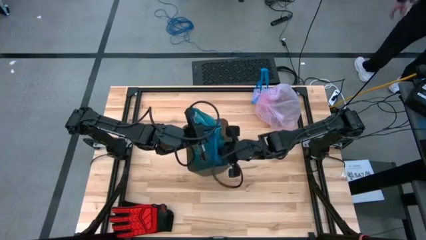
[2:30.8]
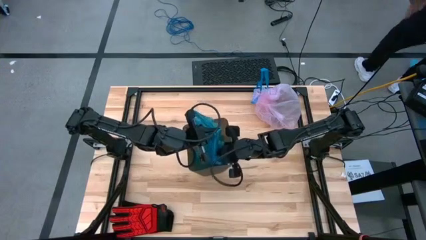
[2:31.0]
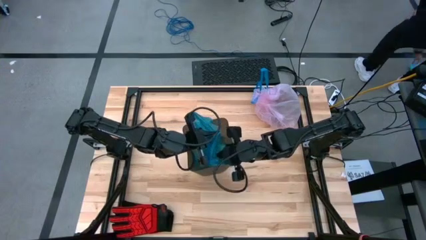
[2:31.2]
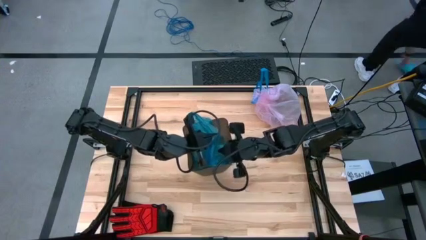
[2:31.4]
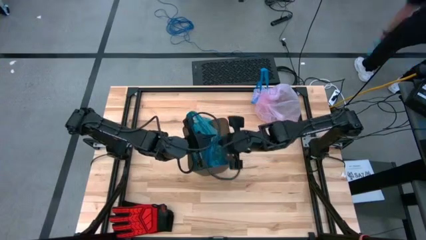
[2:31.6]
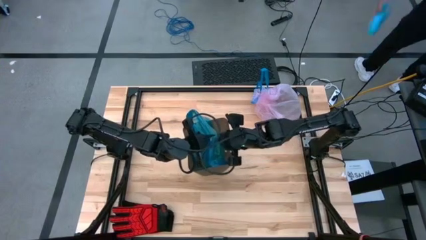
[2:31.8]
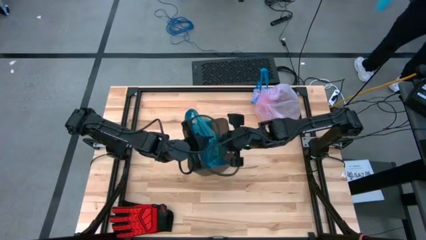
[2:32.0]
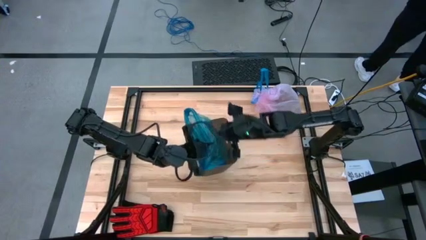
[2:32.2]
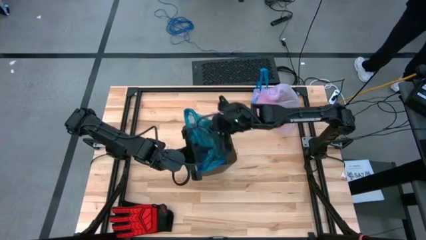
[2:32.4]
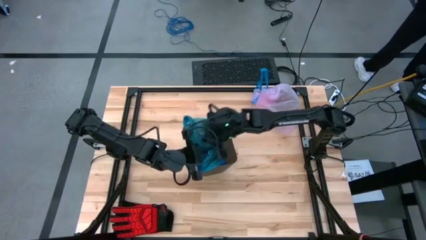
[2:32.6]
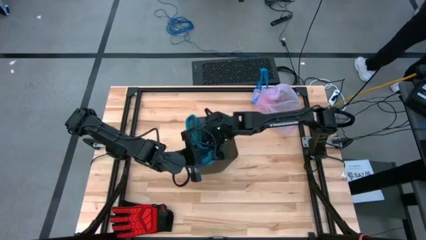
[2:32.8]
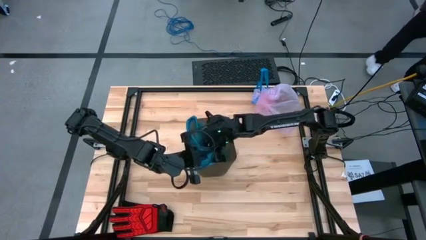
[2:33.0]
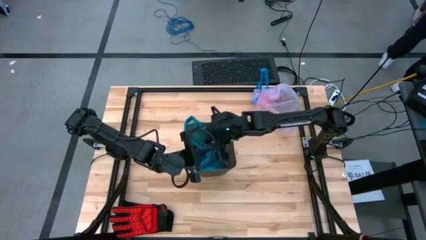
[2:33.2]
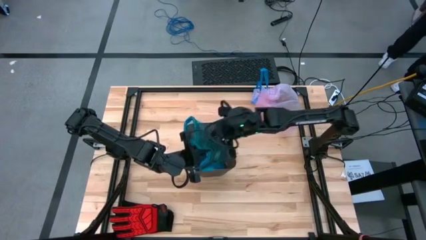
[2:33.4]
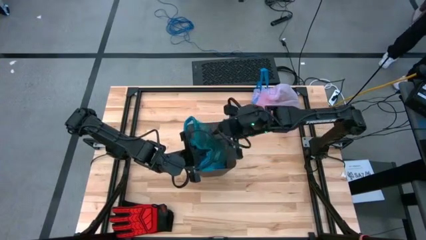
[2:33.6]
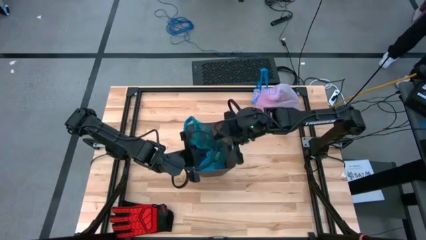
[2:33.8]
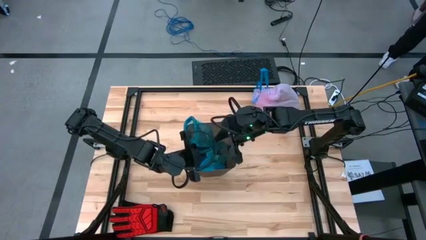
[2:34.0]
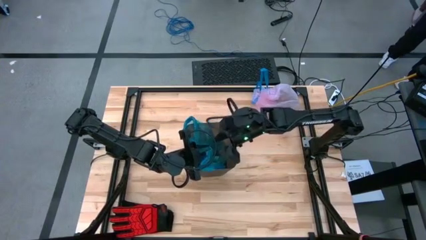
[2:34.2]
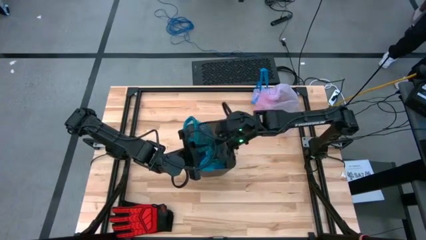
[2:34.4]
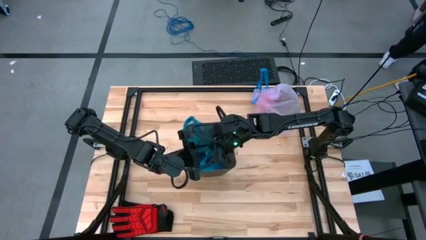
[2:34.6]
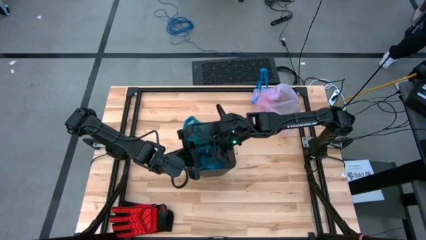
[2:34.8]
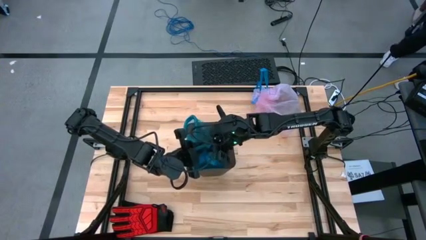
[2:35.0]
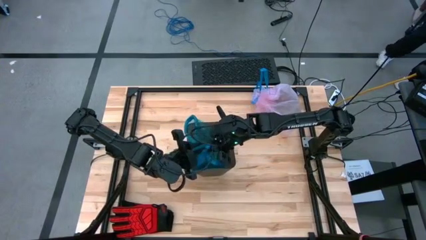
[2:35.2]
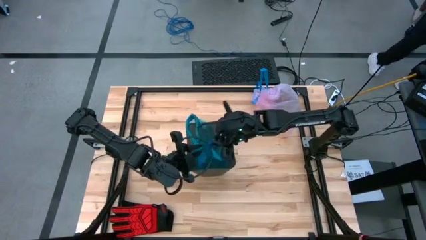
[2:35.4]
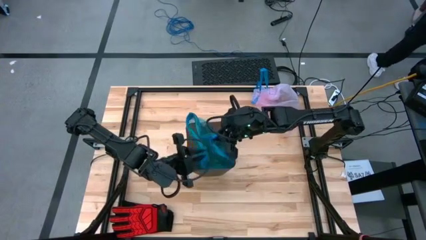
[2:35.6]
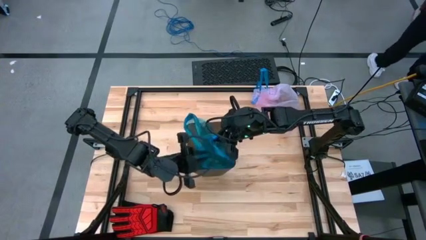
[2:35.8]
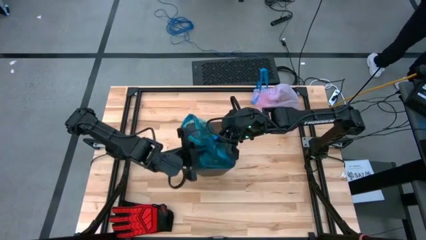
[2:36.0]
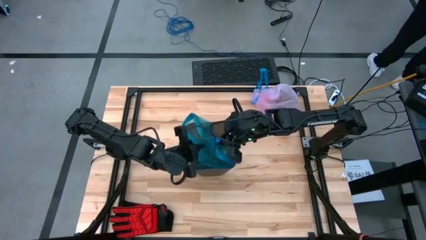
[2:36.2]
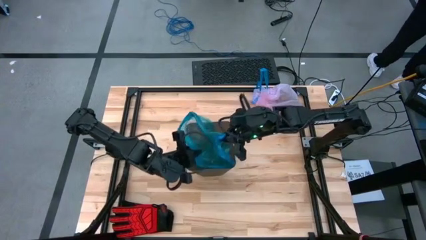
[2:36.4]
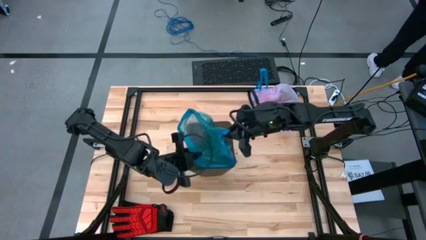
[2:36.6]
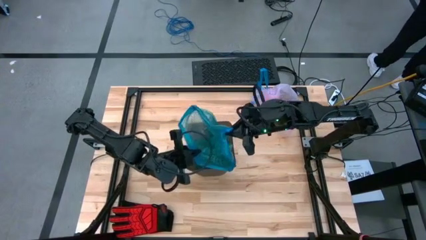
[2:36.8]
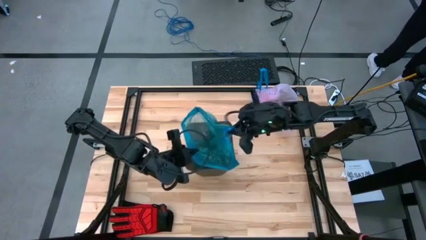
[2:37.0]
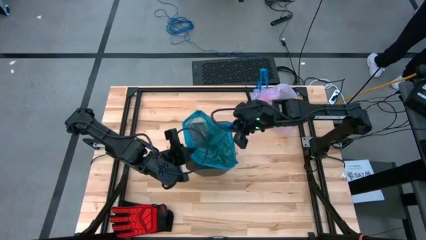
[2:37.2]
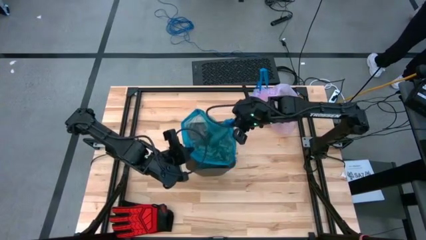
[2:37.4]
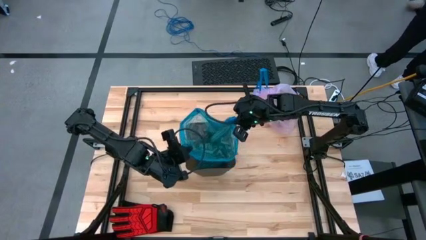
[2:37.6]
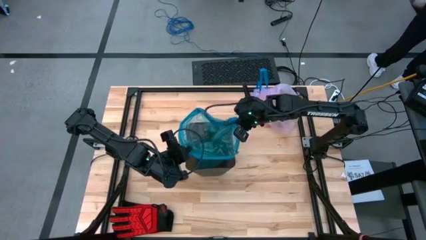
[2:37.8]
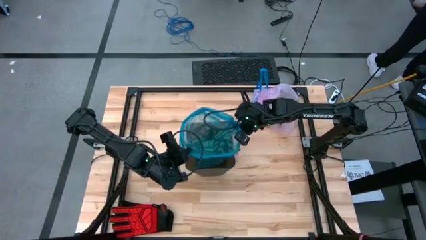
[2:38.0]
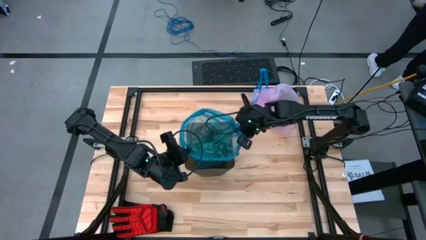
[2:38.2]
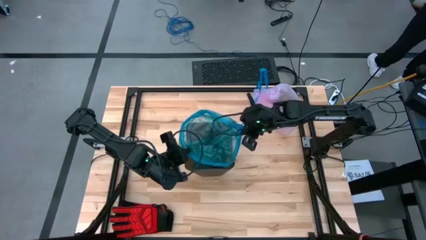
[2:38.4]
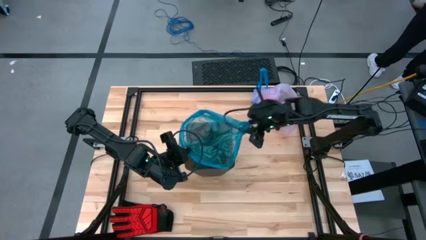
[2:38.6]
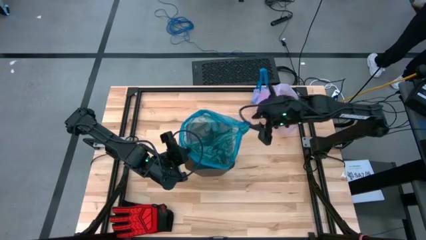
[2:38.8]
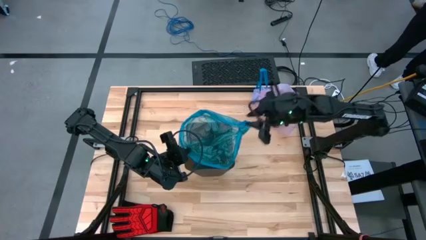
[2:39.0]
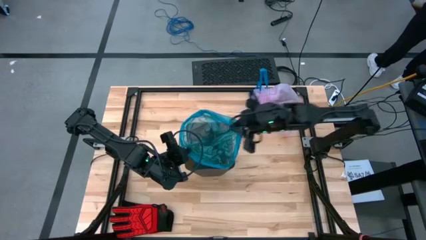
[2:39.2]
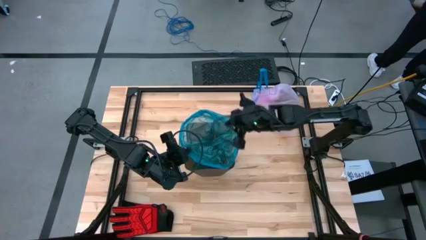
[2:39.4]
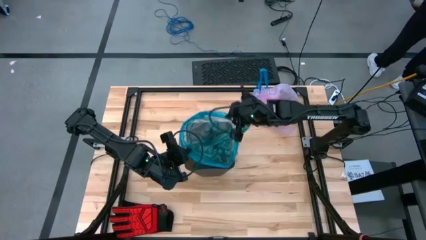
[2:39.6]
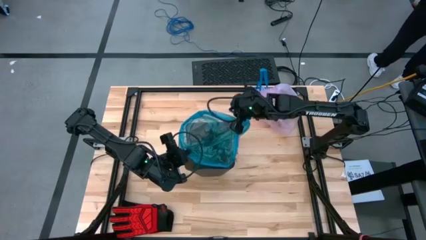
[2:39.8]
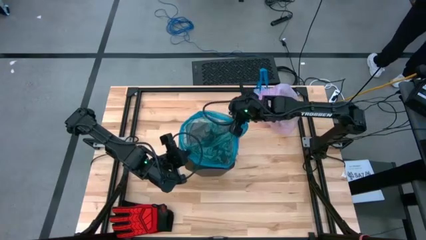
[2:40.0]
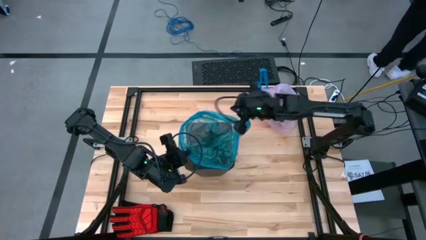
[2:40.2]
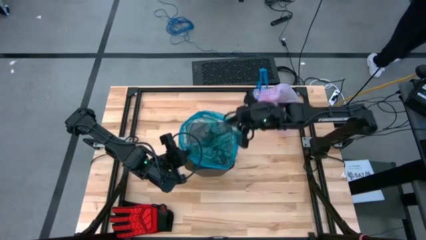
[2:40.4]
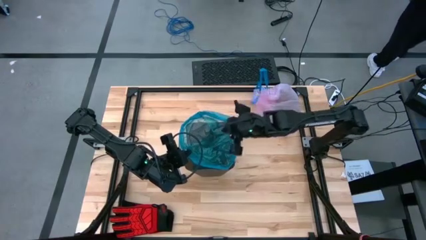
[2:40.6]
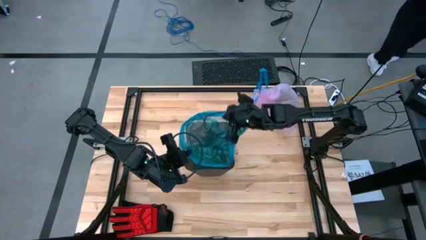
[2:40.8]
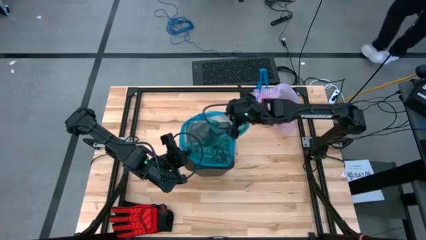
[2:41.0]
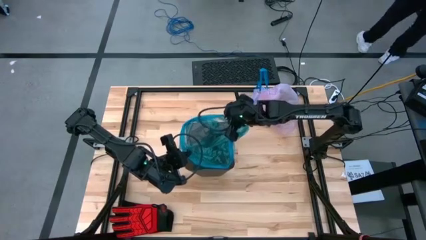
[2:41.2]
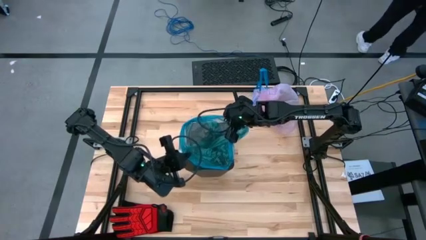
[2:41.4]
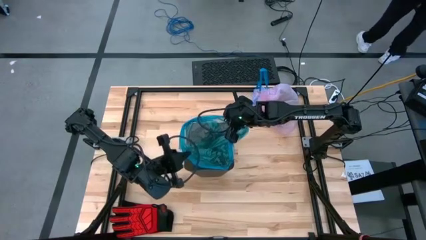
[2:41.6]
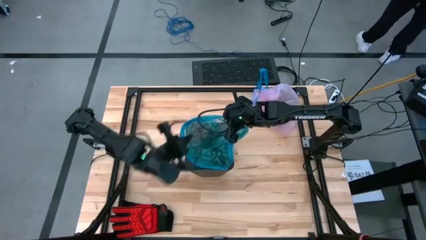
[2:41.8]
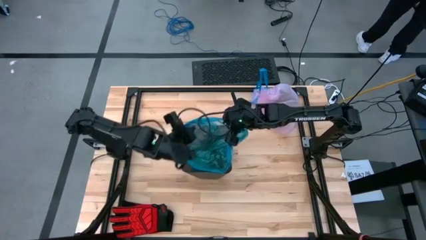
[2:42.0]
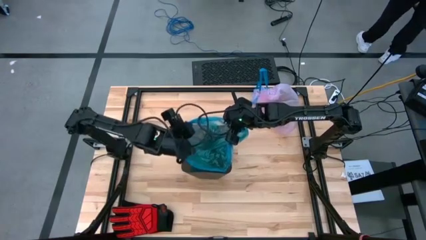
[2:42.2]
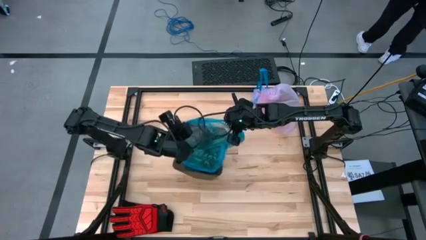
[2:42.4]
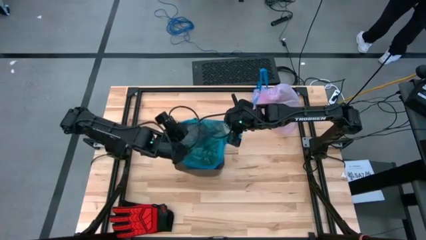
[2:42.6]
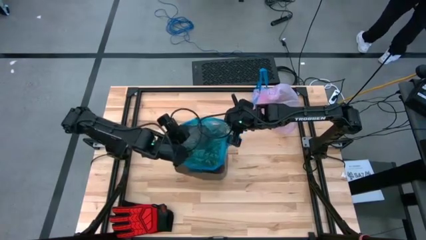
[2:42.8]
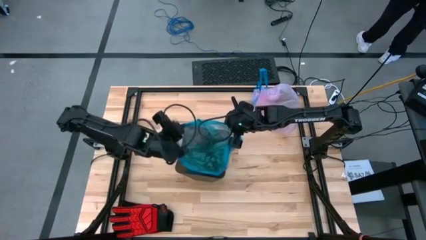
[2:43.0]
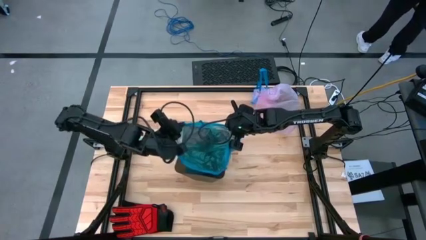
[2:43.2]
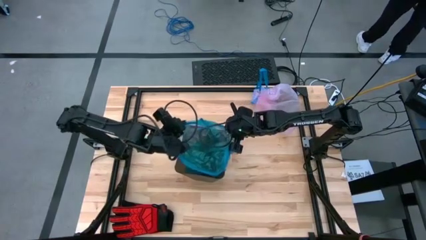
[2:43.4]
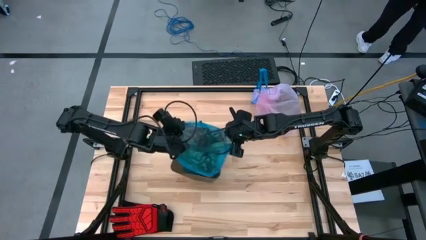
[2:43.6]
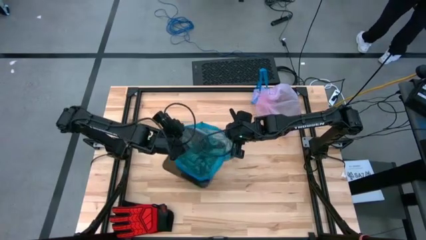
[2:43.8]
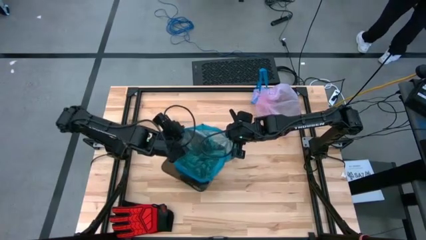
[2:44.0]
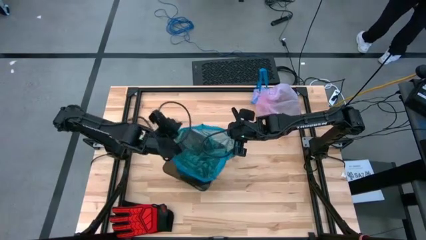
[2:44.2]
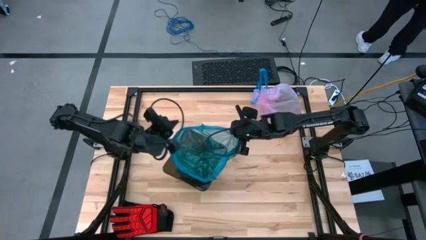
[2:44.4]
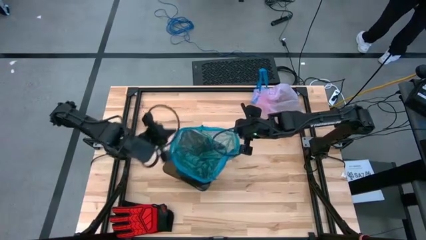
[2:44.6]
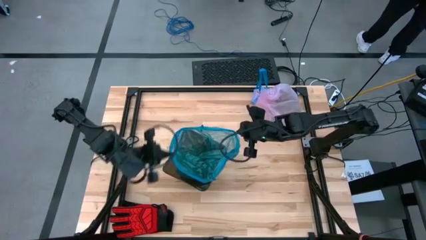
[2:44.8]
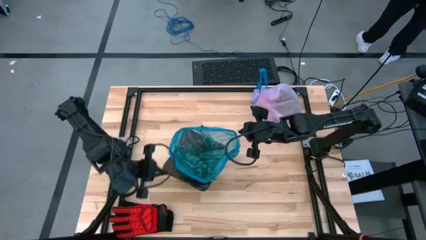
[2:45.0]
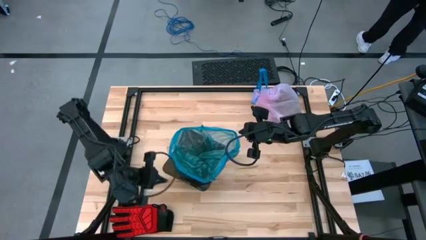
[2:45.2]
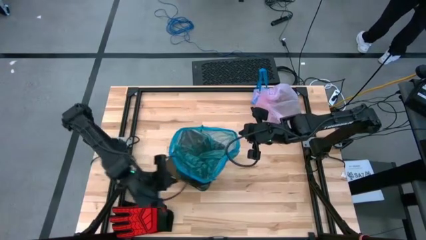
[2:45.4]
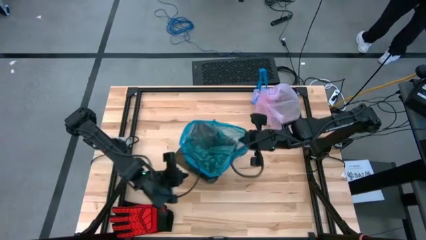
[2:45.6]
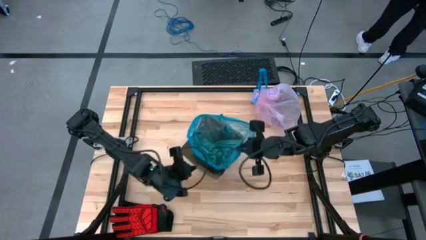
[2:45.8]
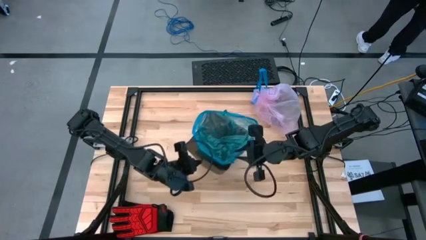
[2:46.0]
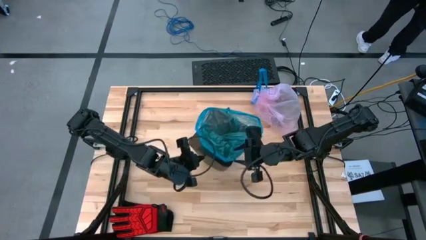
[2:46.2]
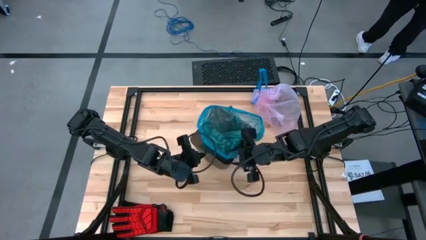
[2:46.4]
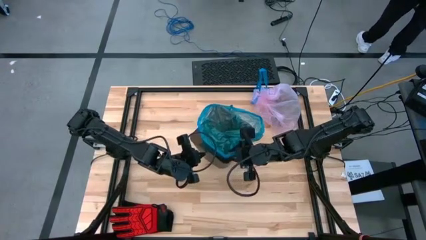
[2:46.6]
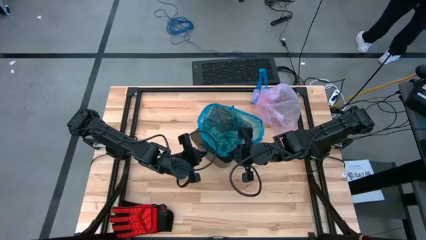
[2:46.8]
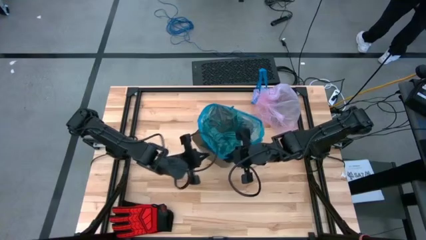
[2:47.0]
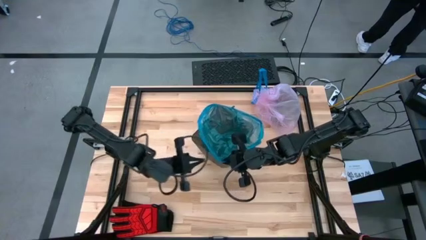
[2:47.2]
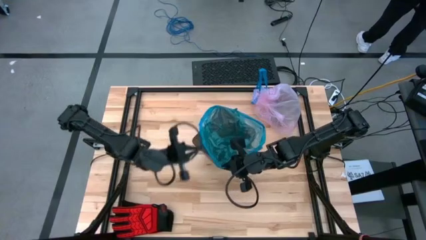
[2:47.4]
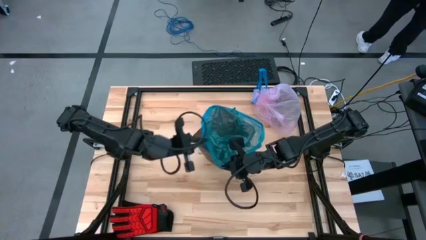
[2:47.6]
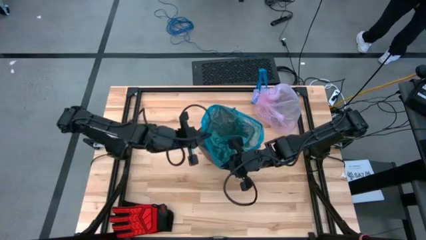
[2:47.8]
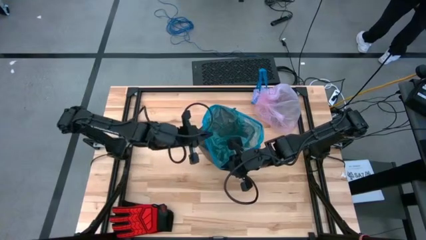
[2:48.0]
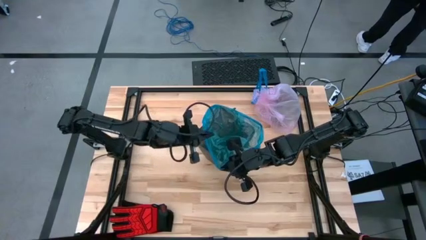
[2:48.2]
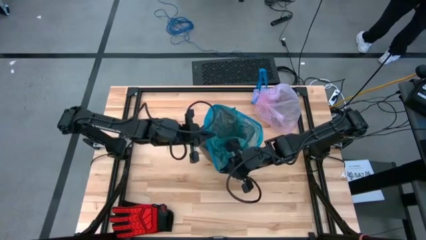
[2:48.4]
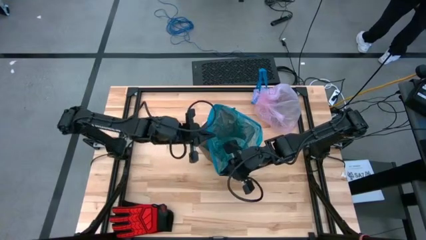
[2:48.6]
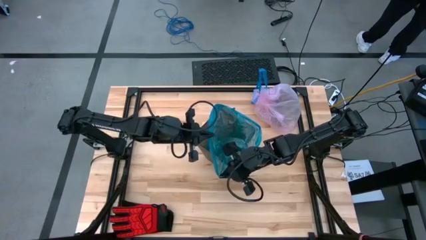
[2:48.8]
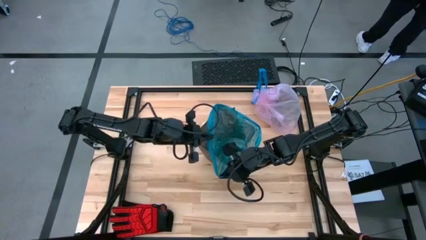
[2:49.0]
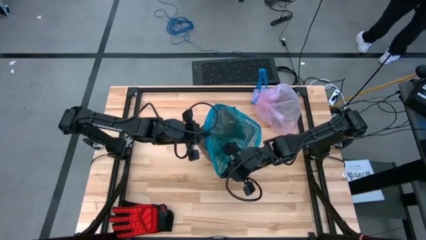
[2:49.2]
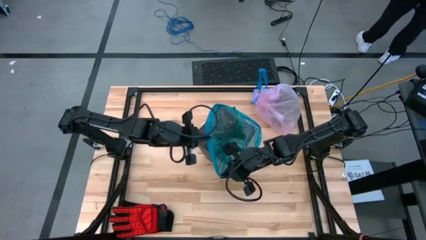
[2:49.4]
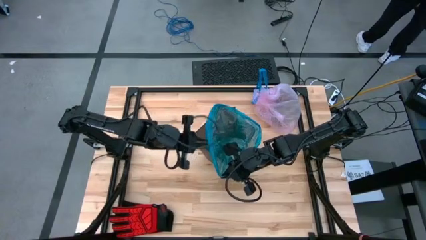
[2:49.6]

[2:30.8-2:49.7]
Task: place trash/remove bag and relplace
Insert a new trash bag into the trash bin
